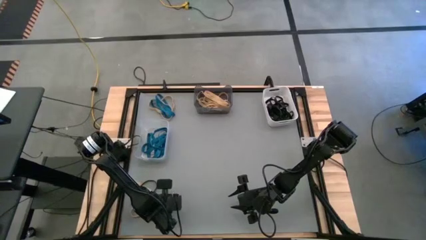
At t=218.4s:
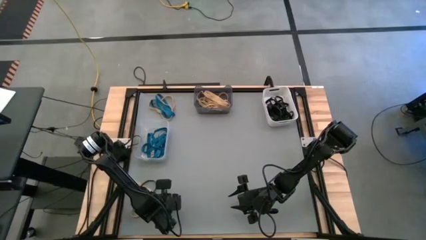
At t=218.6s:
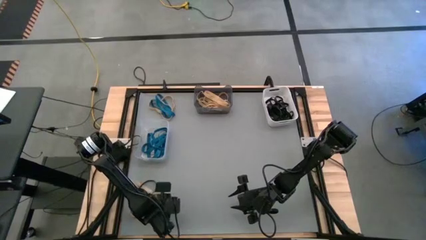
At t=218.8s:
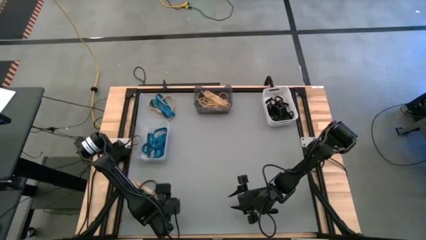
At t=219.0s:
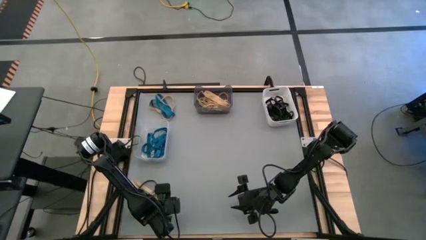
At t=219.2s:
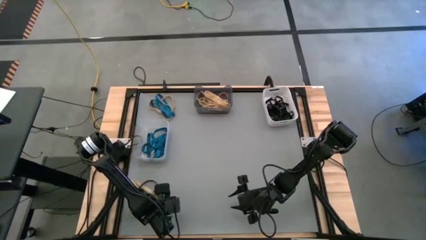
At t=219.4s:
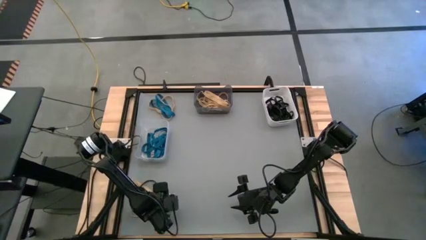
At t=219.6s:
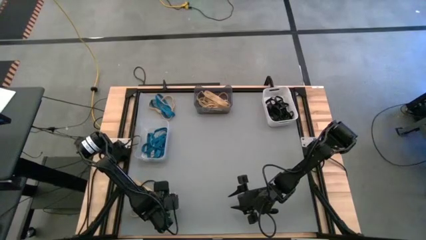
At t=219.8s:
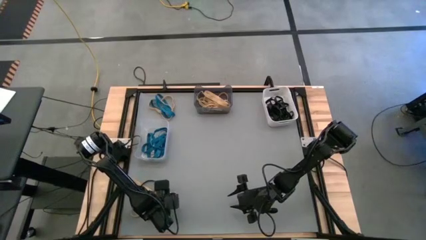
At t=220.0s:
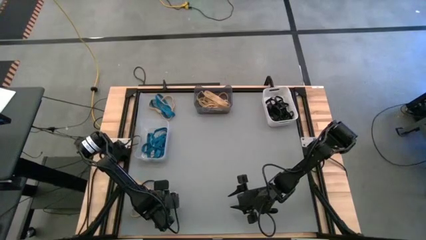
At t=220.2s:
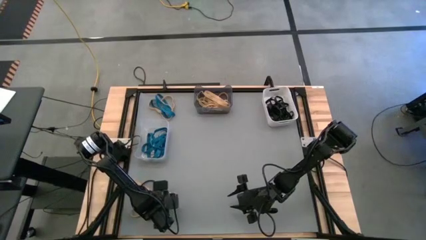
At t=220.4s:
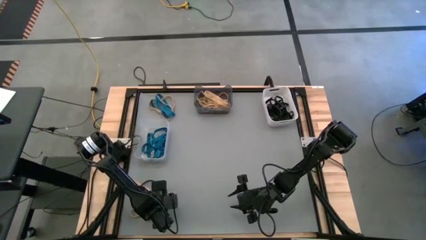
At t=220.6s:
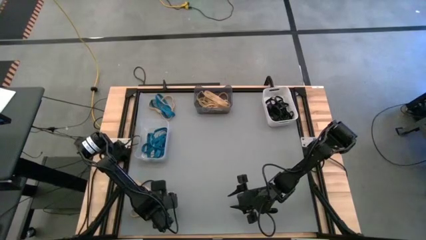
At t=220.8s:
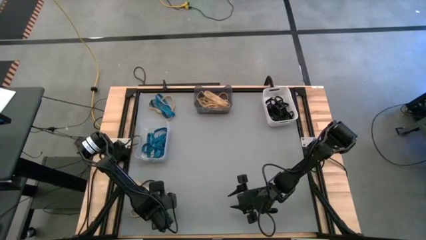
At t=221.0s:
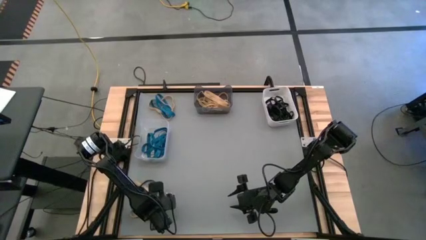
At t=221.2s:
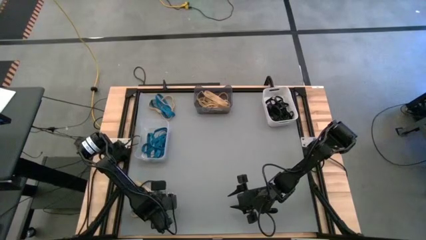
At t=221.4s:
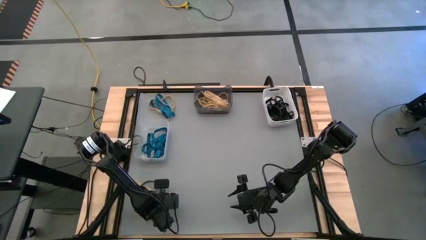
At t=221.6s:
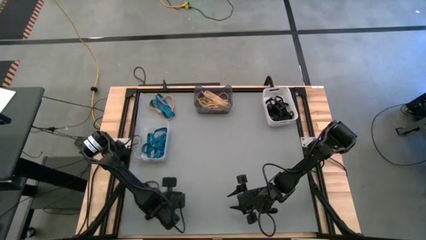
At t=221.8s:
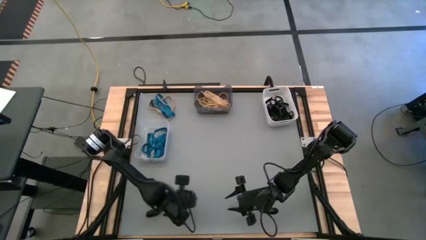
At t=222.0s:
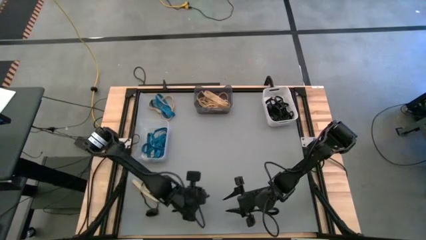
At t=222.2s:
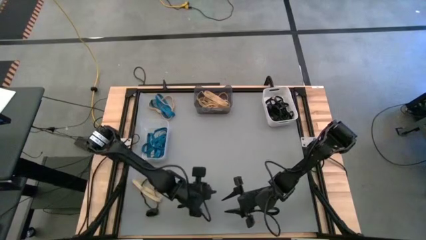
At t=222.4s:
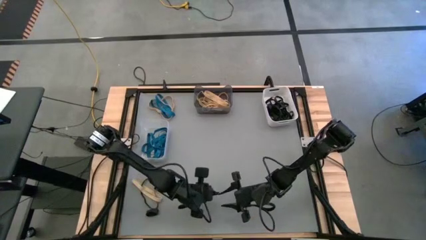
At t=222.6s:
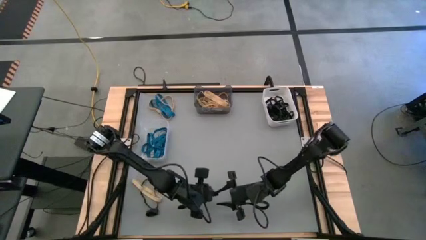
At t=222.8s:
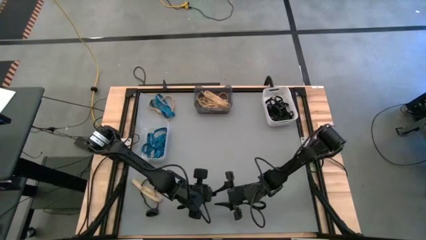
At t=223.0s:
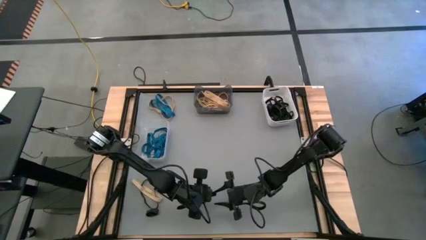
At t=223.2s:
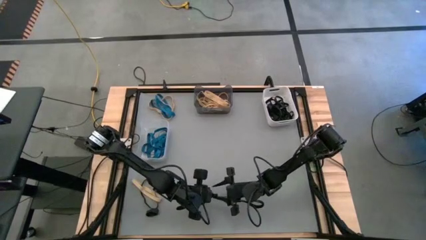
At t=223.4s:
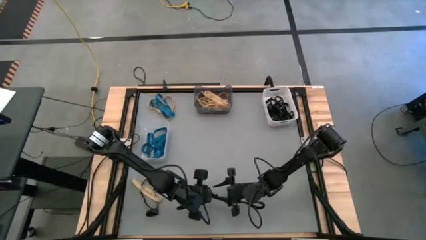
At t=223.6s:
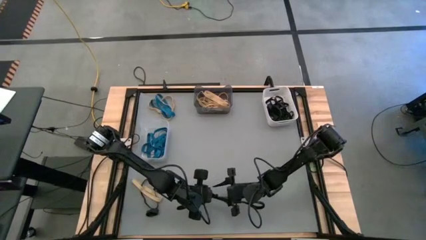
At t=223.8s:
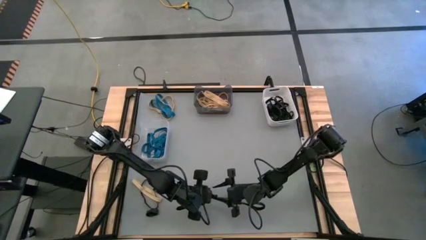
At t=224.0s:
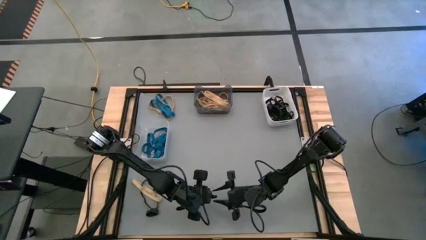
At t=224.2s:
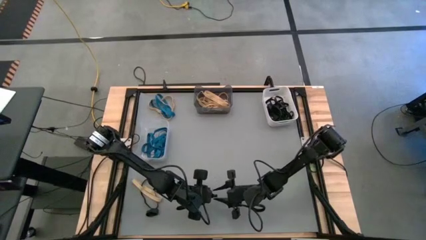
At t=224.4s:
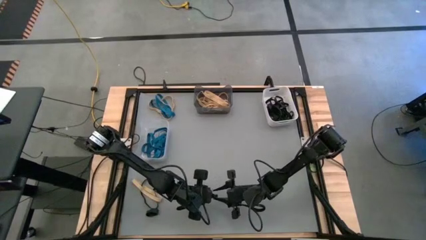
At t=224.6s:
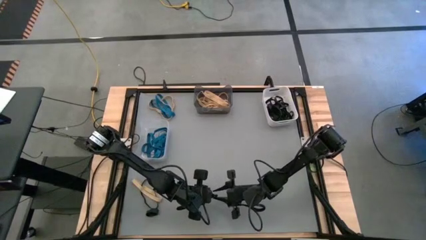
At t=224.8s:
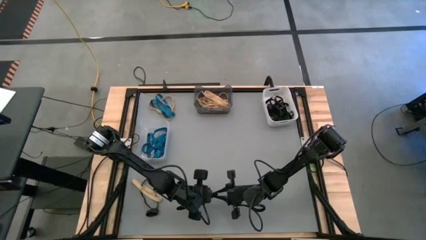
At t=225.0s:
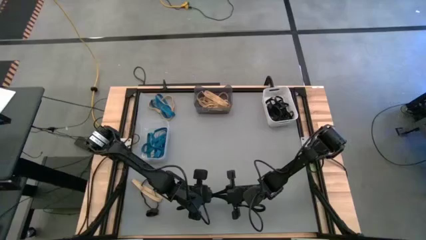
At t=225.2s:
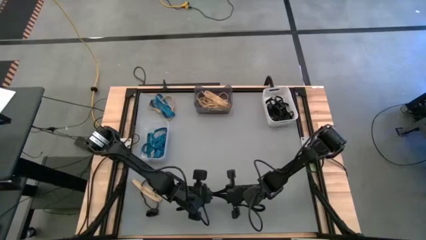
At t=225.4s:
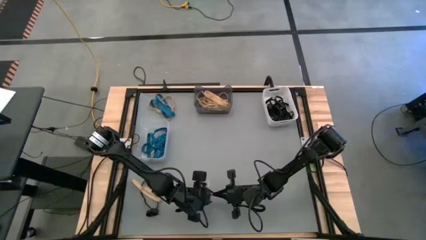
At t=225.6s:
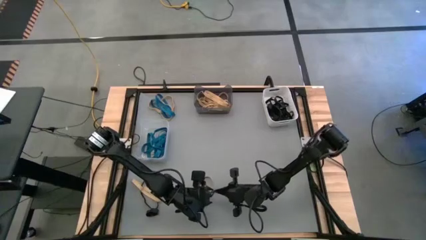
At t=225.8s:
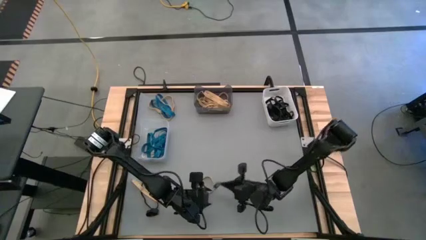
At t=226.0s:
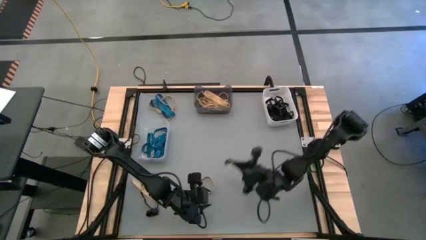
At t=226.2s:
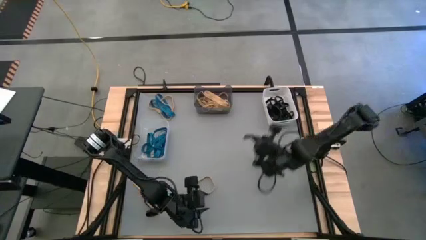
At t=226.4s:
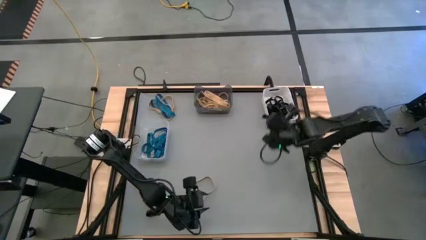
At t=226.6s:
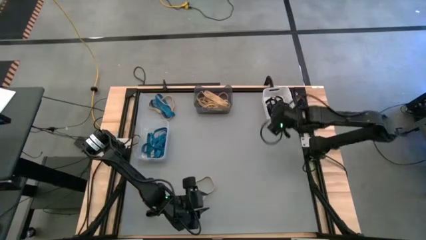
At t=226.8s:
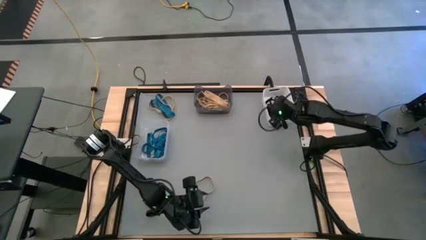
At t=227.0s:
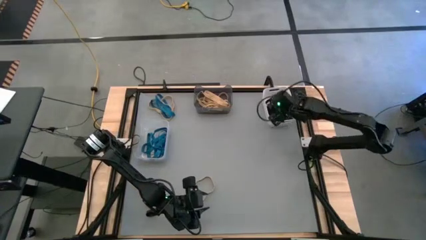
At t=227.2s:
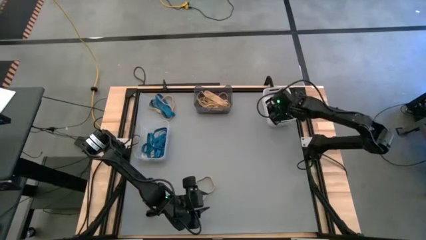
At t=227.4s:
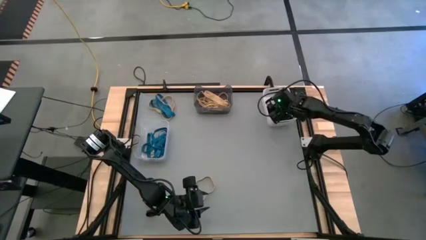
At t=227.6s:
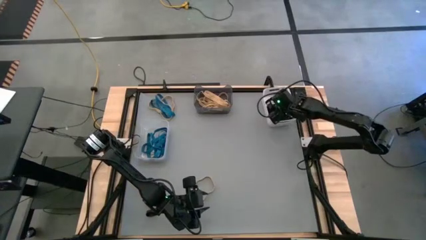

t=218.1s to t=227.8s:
Task: Sort rubber bands into baskets
Put the black rubber band into the white bin

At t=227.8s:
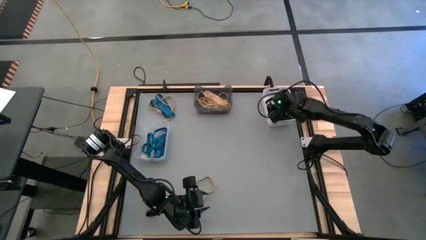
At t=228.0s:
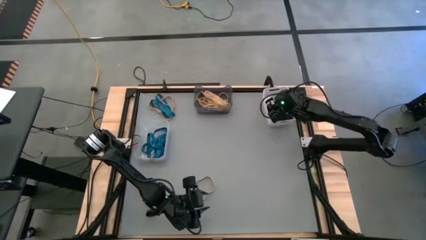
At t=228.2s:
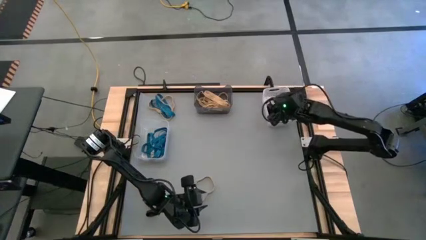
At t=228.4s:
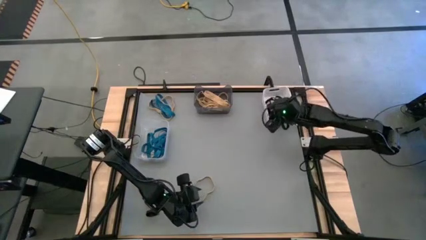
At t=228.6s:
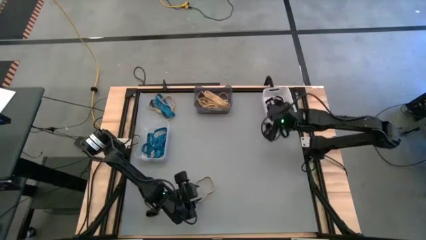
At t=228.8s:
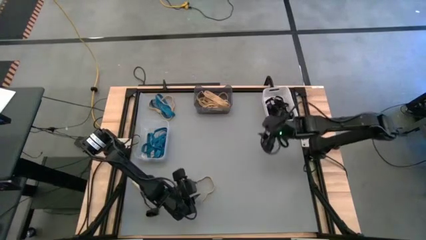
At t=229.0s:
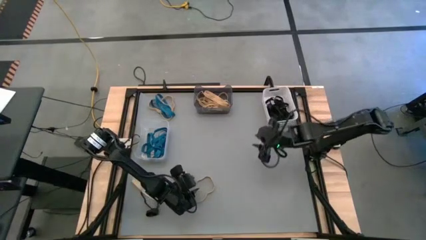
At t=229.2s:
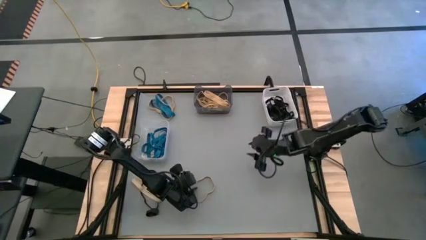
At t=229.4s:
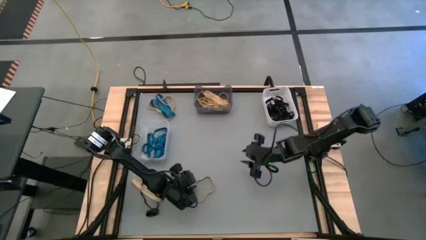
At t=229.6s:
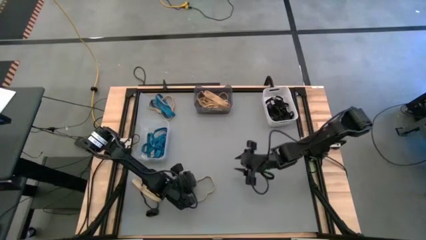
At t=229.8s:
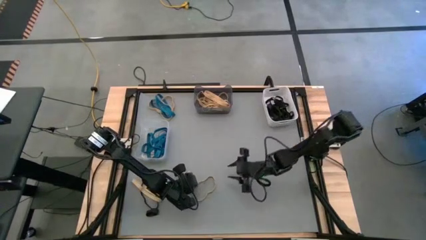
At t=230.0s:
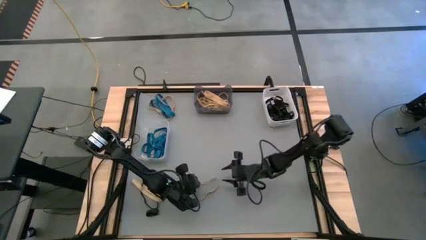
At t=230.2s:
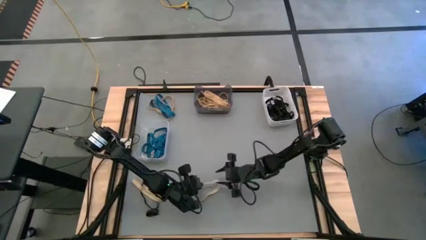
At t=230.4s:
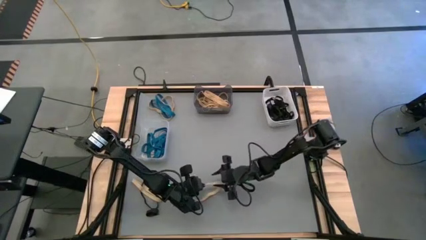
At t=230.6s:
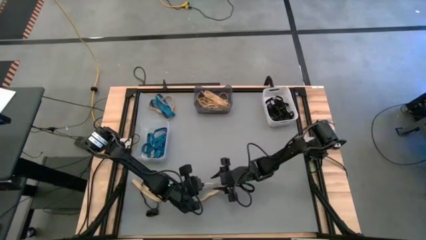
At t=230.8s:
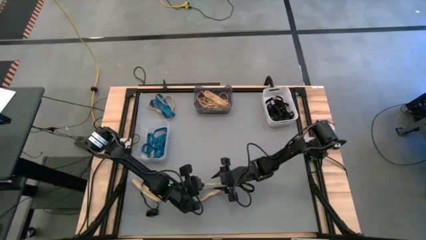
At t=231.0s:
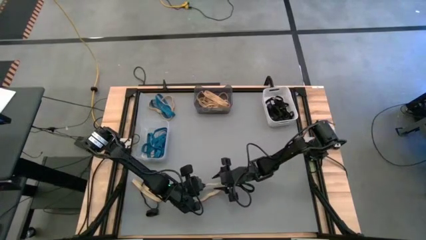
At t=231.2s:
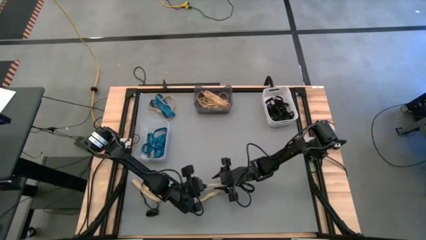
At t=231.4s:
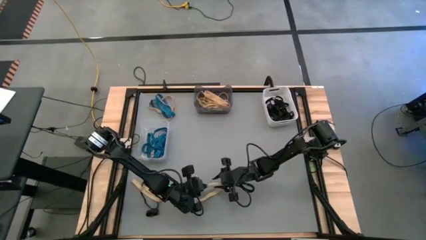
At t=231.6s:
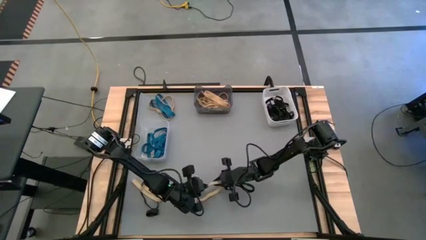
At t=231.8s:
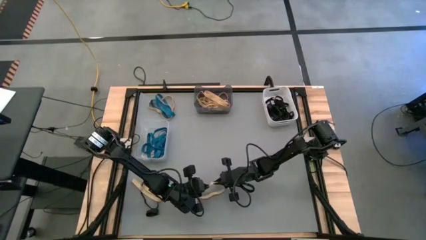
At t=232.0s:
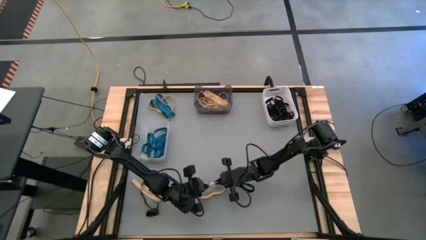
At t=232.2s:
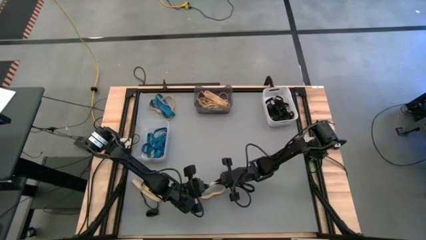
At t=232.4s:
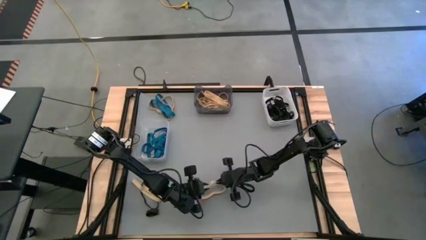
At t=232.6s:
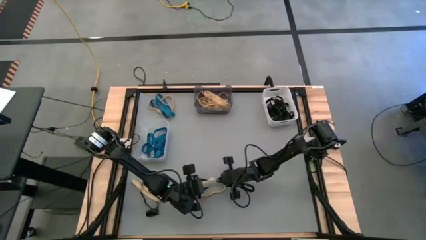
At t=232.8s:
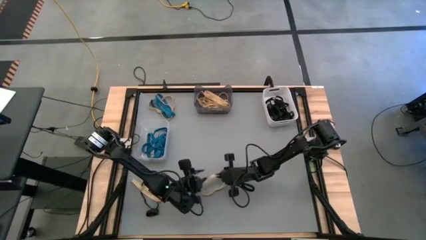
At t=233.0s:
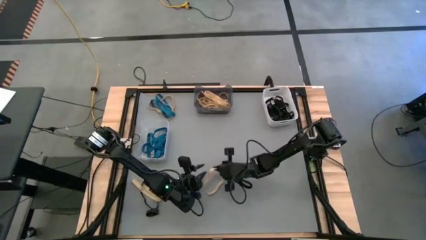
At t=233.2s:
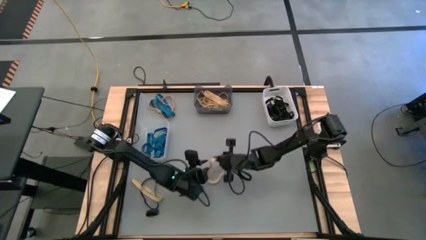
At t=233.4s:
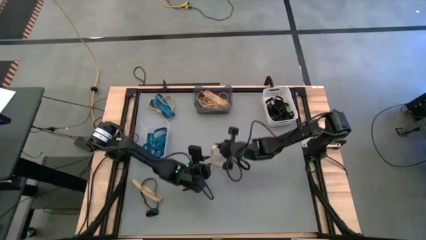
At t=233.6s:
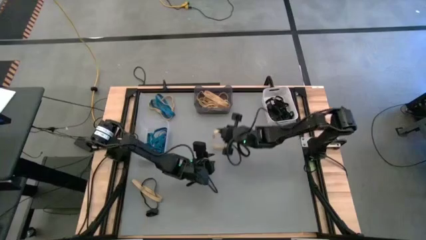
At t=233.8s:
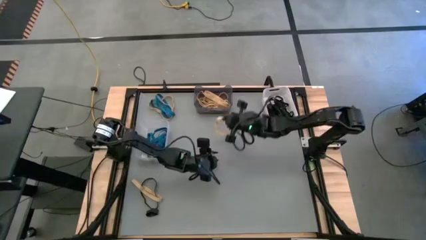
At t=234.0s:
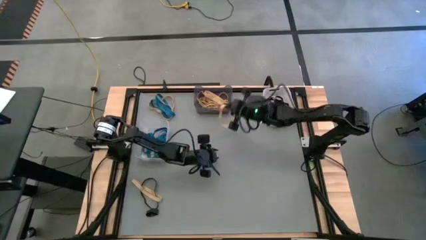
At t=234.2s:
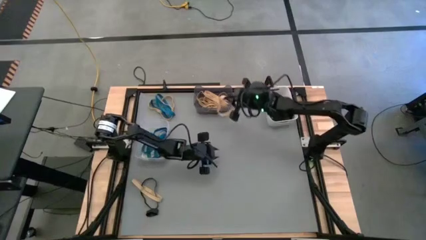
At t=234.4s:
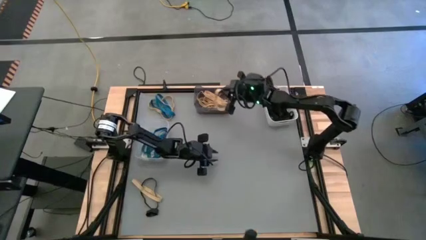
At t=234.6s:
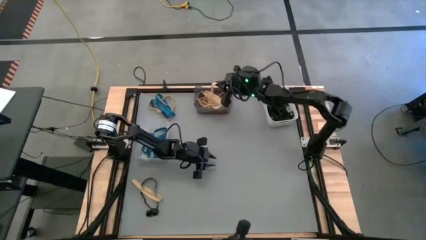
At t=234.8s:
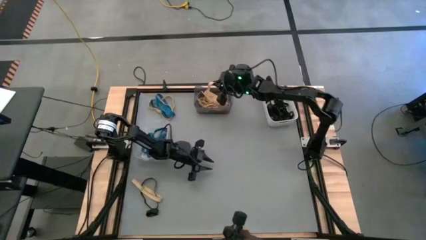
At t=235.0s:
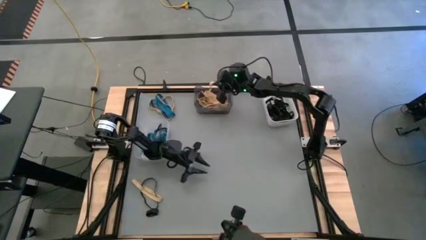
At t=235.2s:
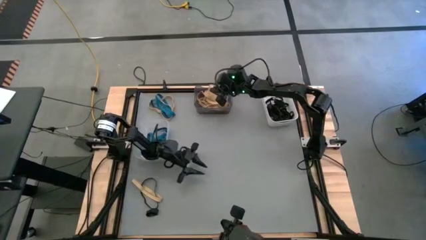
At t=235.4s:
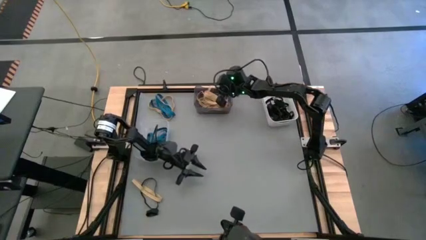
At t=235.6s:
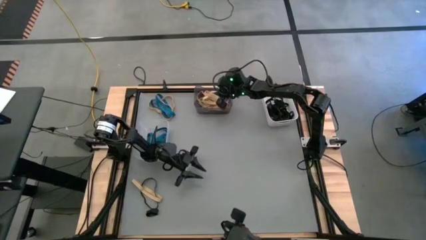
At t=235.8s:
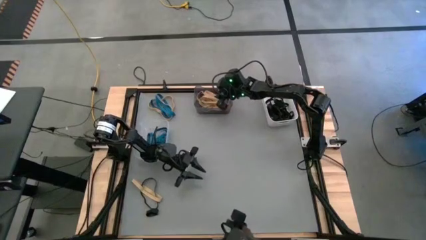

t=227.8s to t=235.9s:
Put the brown rubber band into the black bin
